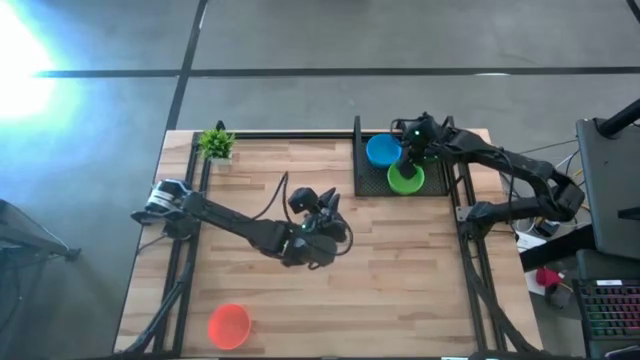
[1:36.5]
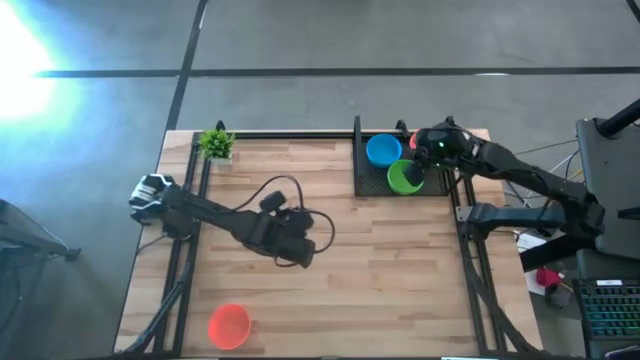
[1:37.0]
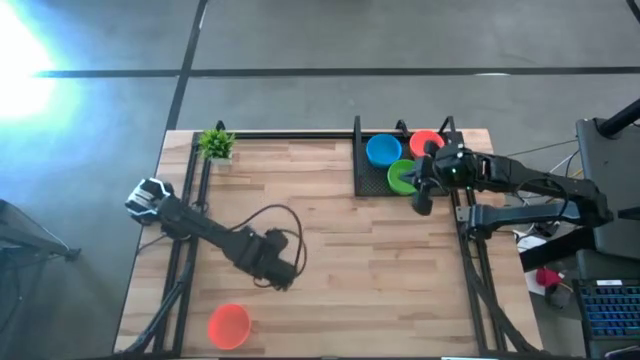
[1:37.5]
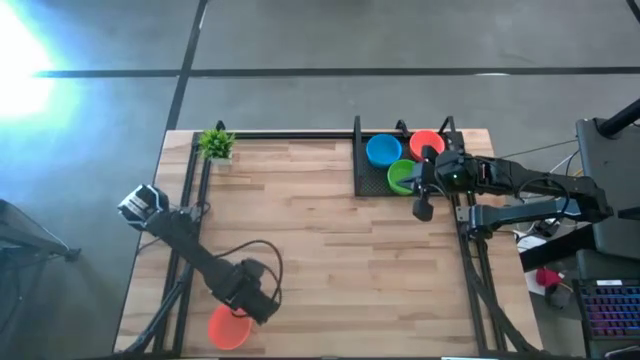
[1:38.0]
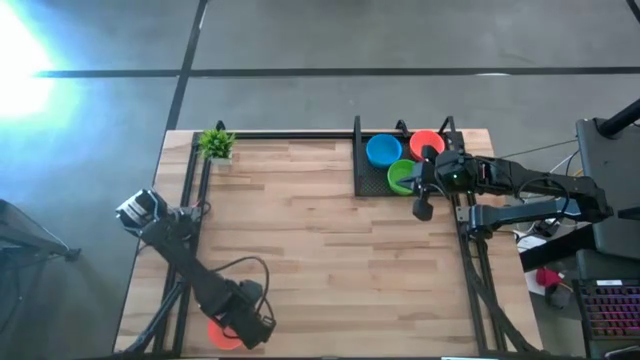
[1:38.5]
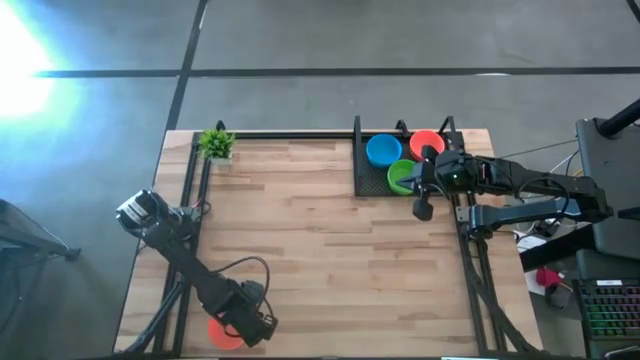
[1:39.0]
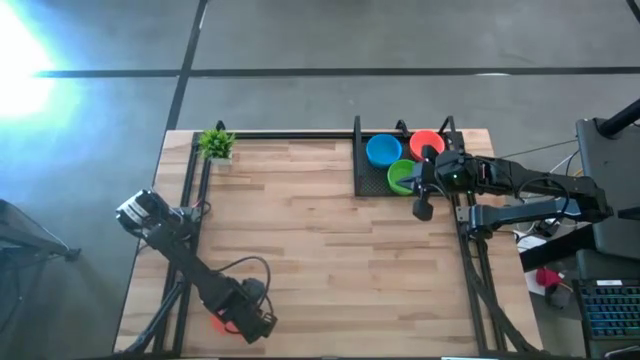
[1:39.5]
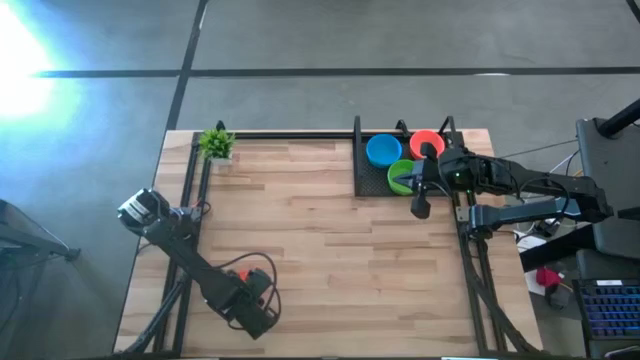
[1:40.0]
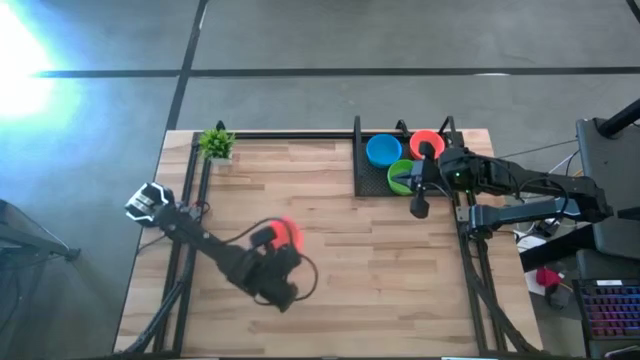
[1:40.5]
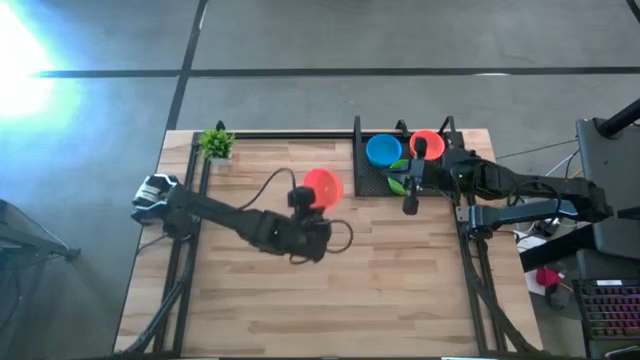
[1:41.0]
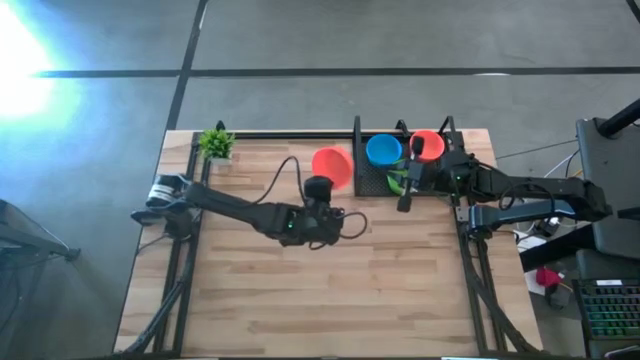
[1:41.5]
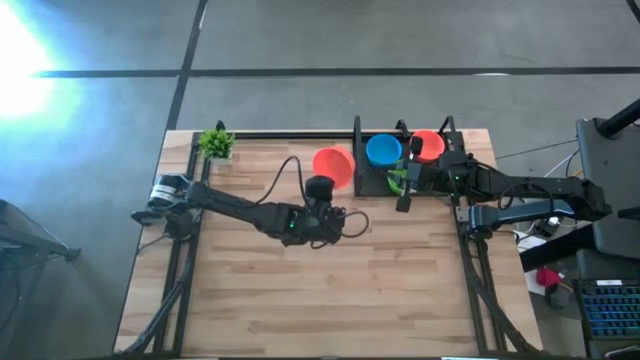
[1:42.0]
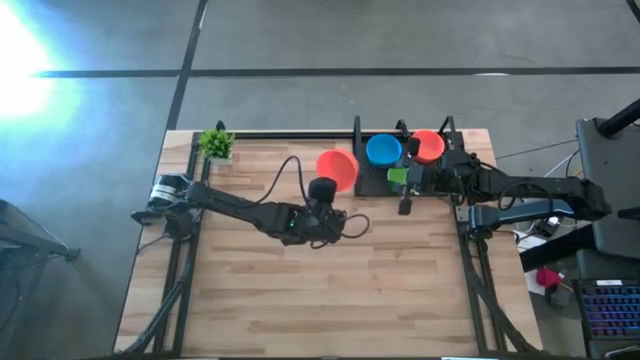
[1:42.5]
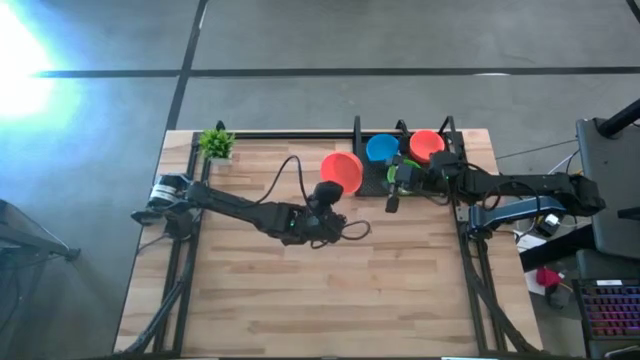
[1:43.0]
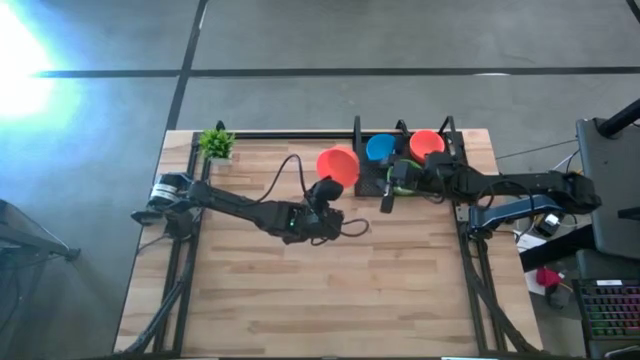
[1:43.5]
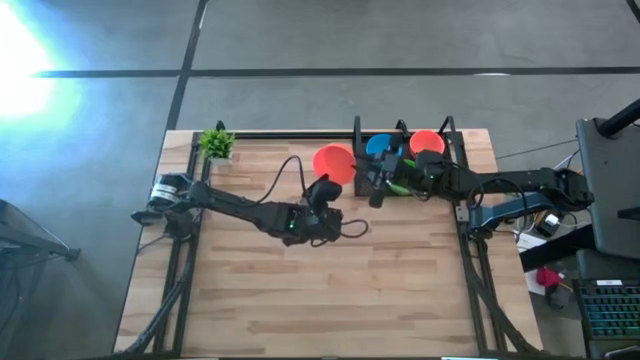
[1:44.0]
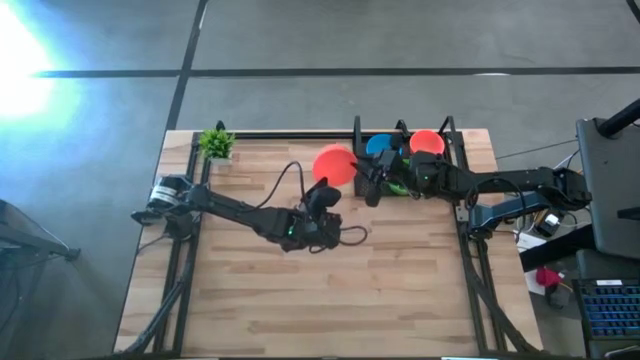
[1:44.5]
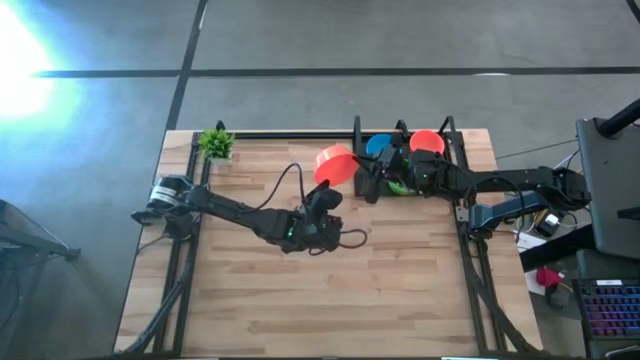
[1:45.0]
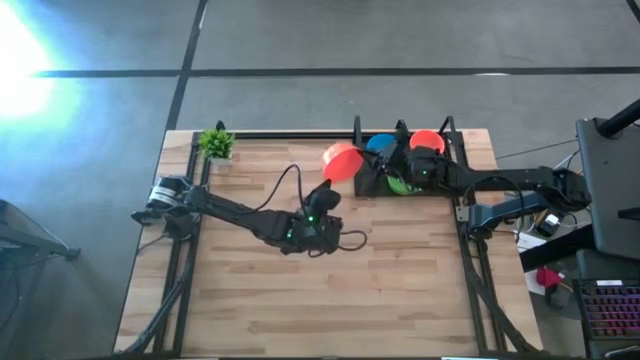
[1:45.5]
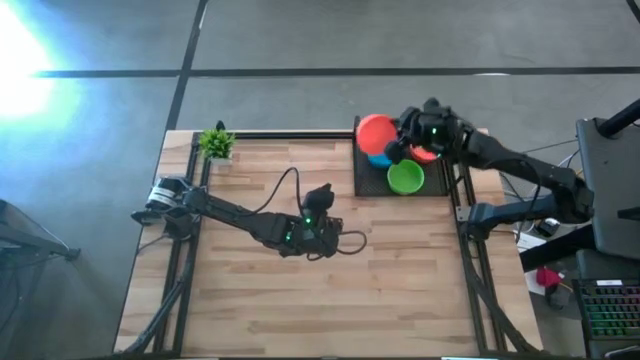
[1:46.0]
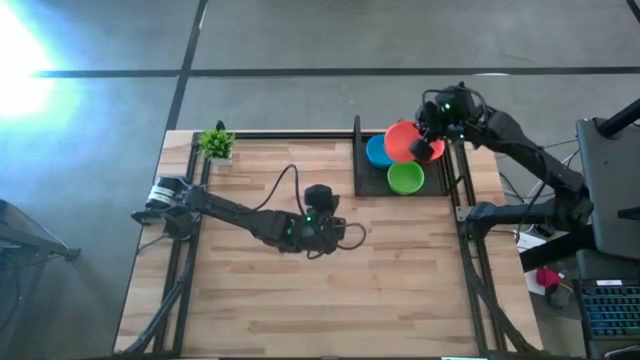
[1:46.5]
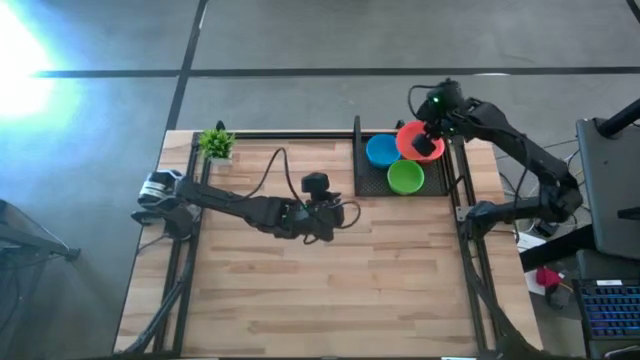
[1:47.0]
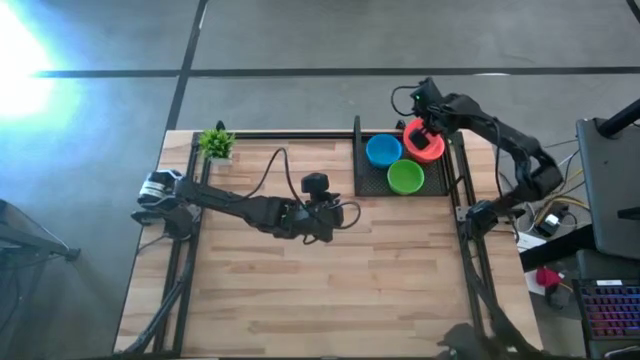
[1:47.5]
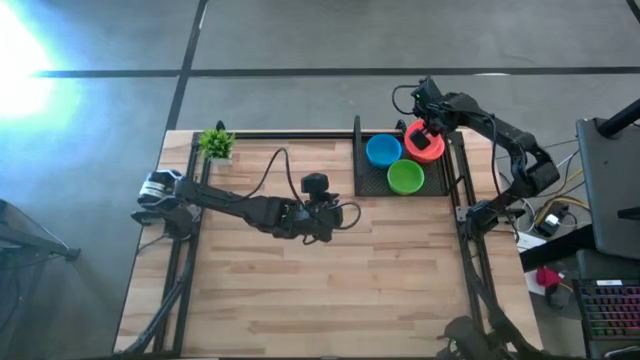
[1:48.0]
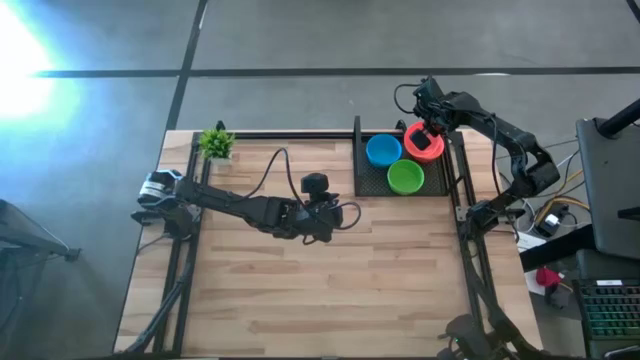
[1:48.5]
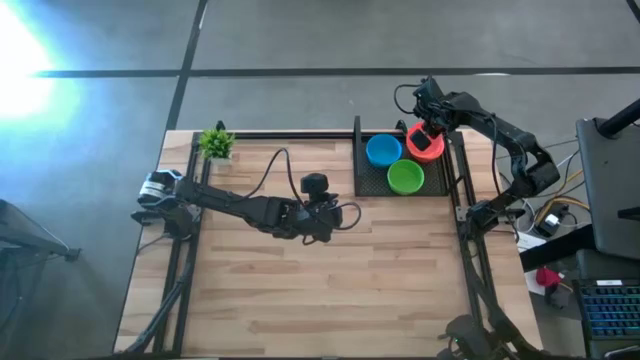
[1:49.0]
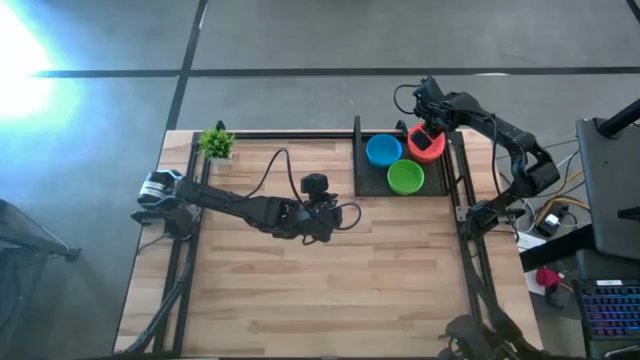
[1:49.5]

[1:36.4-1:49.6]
Task: Pick & Place Mini bowls
Stack the orange bowl on top of the orange bowls on the shelf

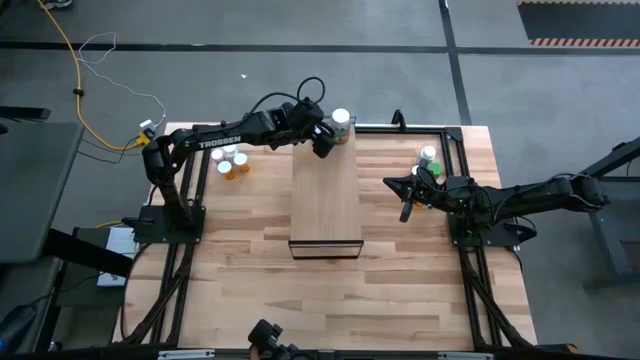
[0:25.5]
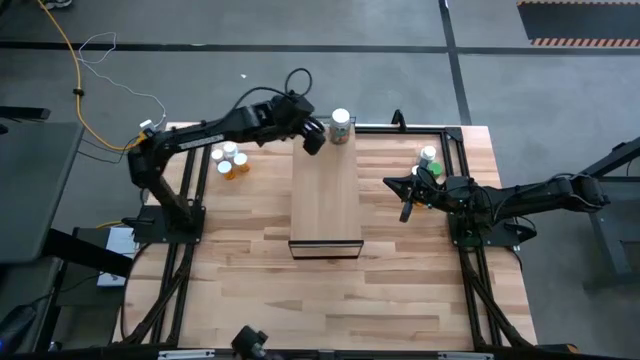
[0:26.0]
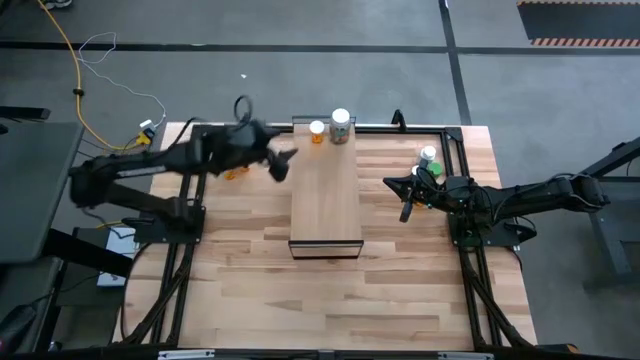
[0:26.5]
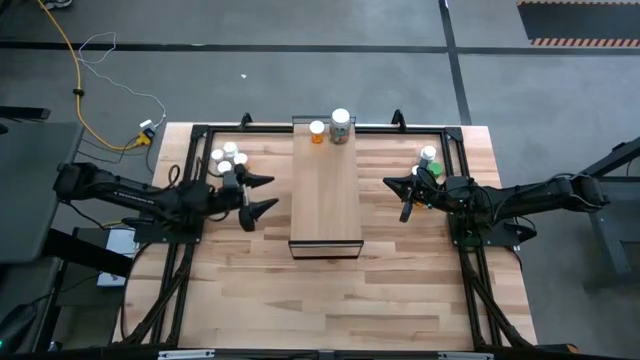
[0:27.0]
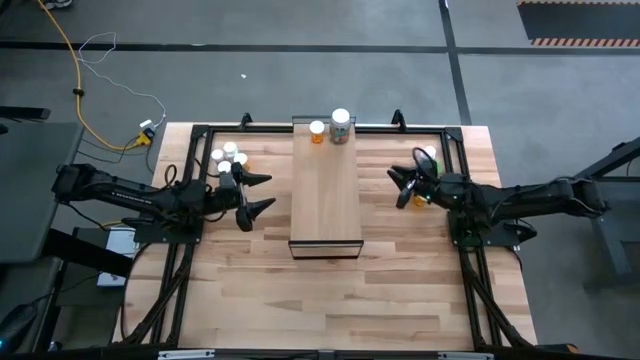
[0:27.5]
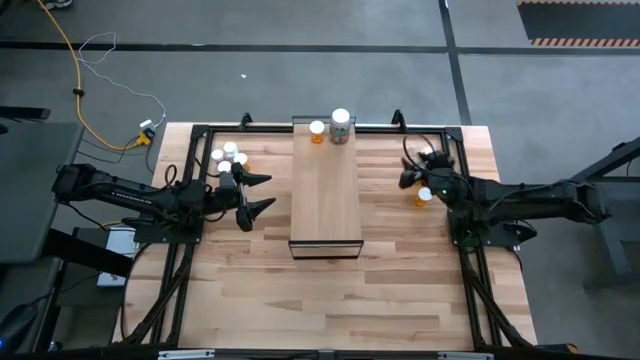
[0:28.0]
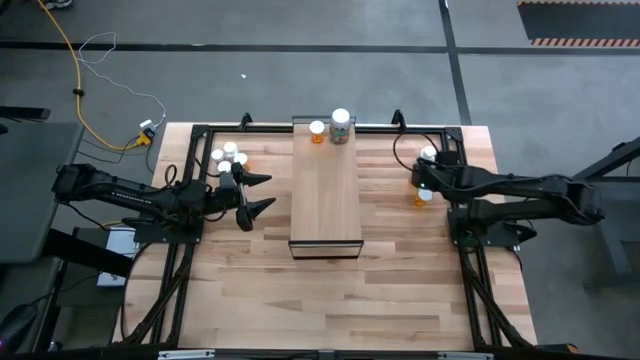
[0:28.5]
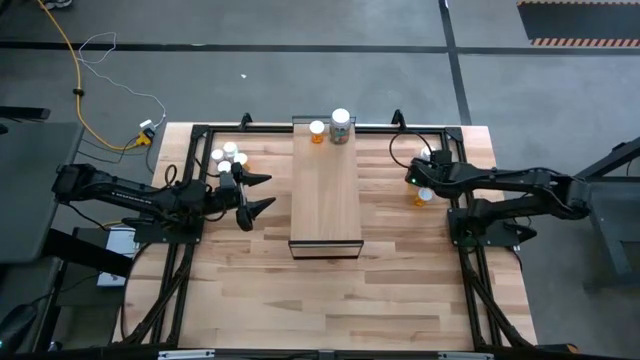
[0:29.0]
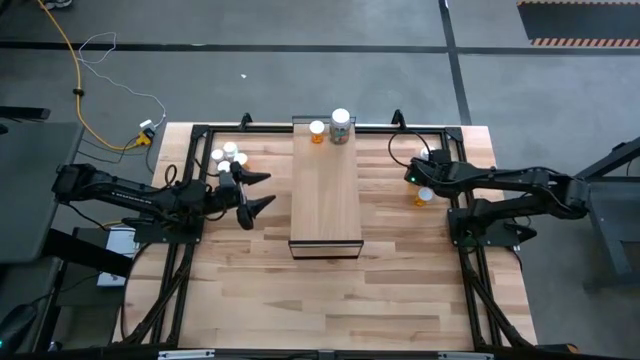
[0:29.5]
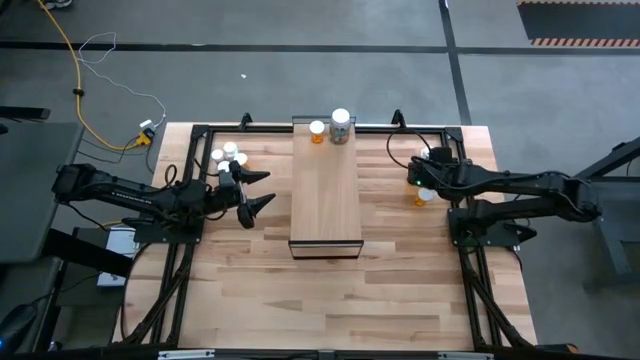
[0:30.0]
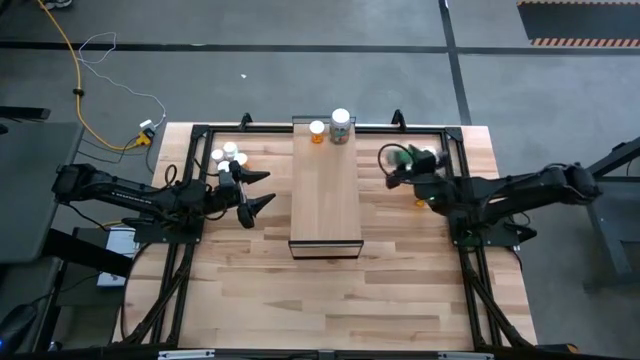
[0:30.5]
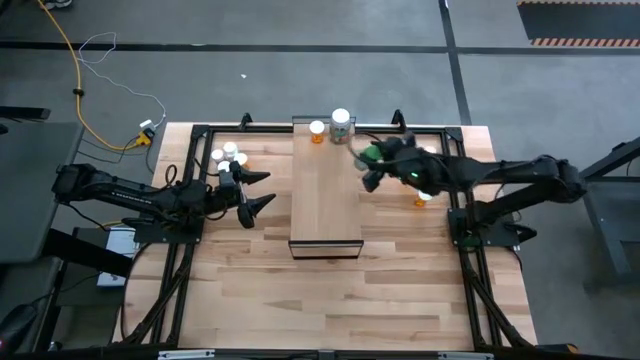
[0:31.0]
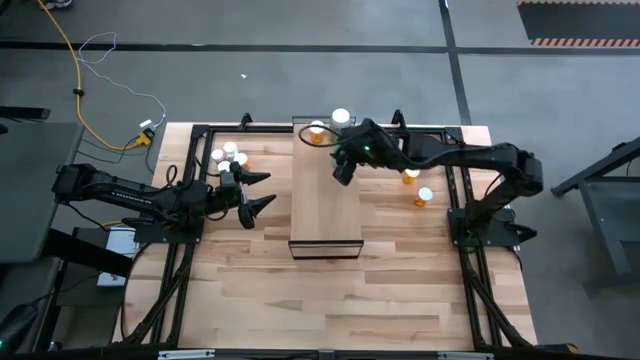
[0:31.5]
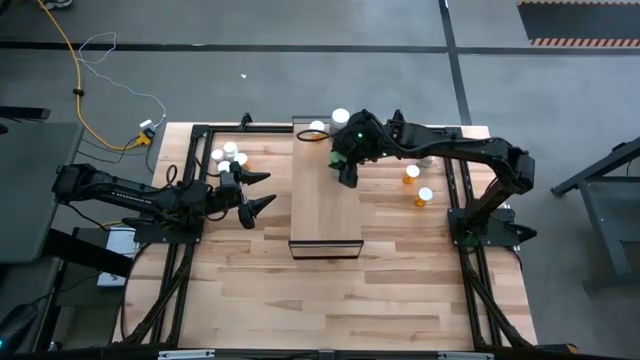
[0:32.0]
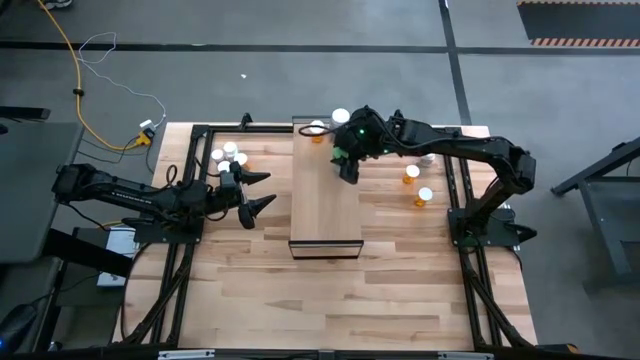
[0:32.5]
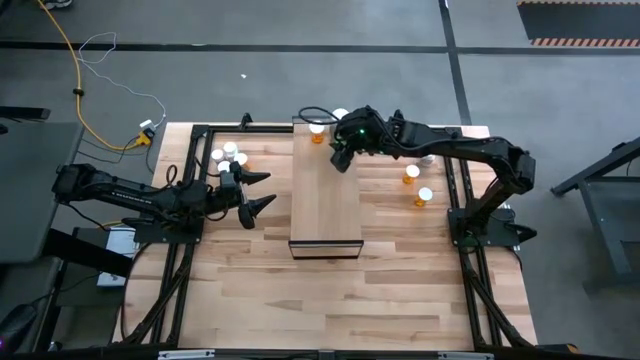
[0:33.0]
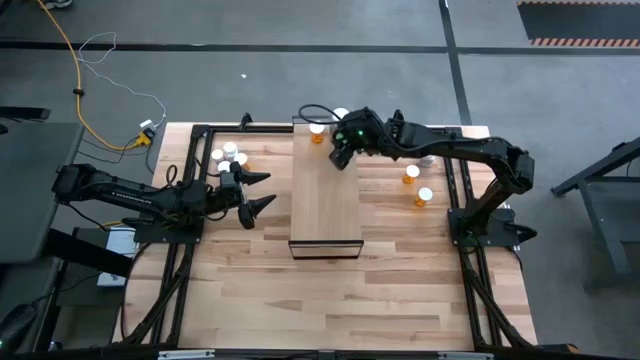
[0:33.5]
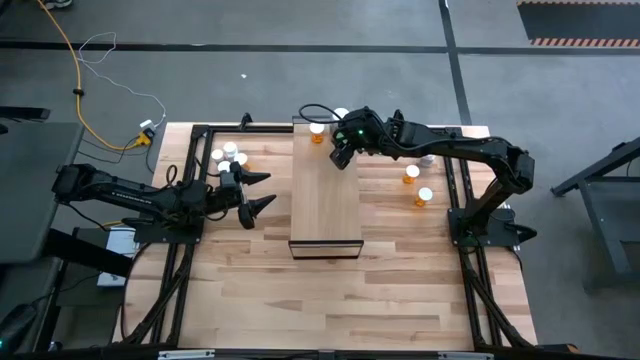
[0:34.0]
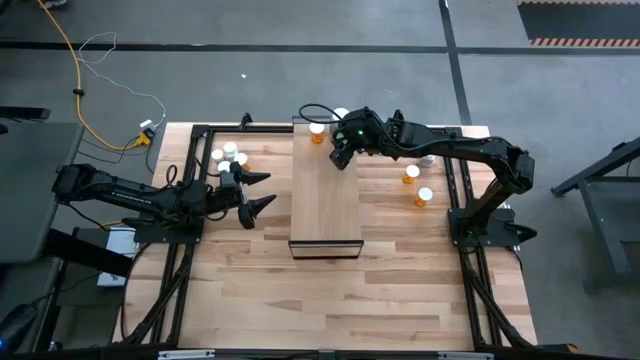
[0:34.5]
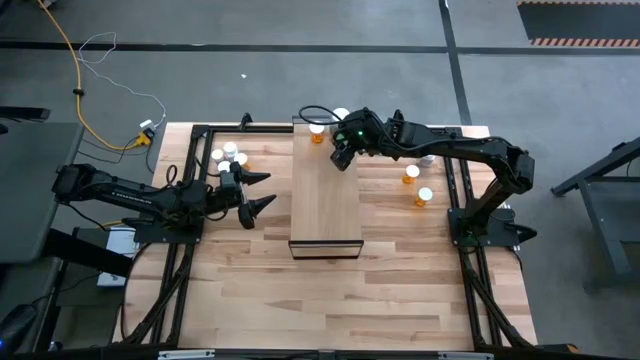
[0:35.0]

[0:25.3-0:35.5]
Task: Pick and place medicine bottles onto shelf by color
Put the green pill bottle on the shelf
